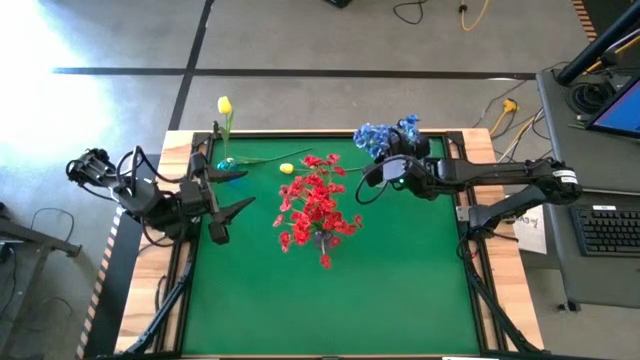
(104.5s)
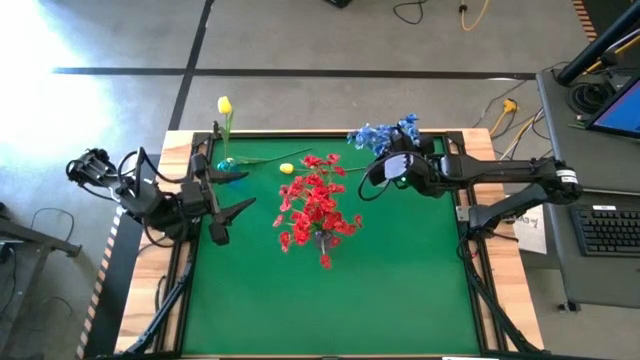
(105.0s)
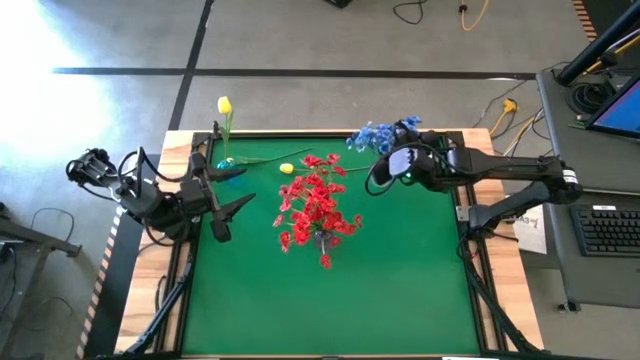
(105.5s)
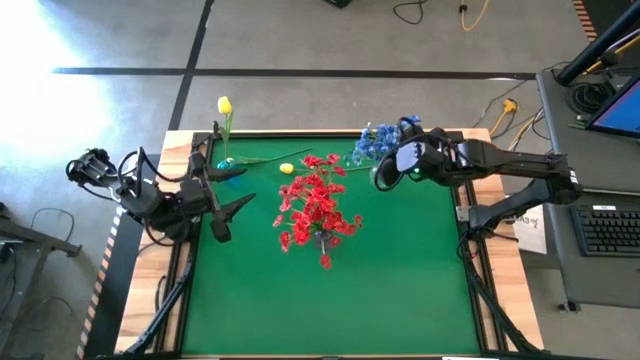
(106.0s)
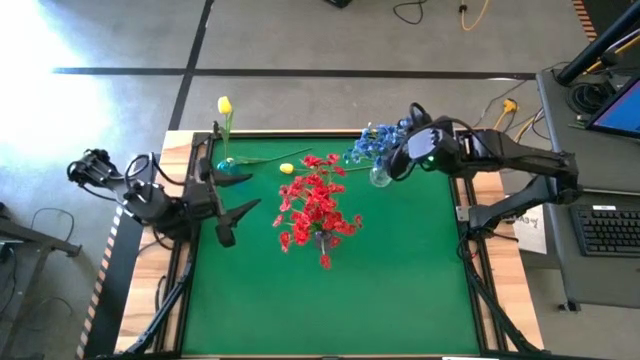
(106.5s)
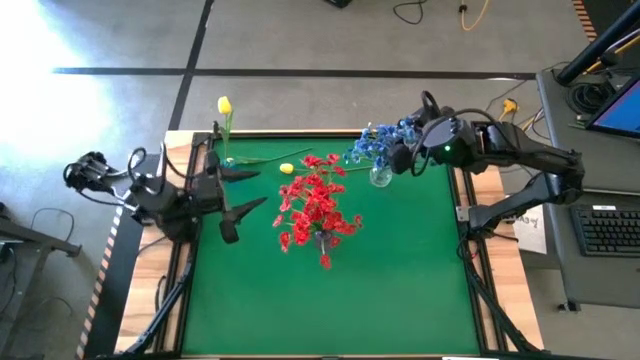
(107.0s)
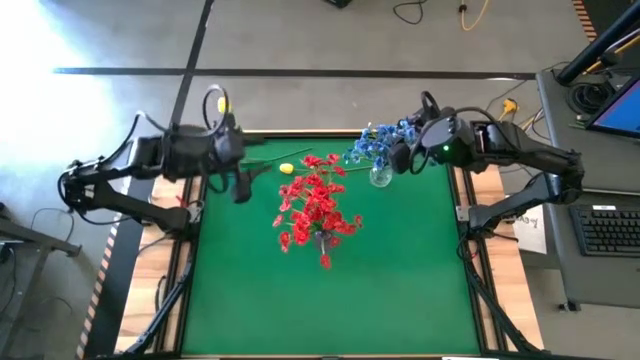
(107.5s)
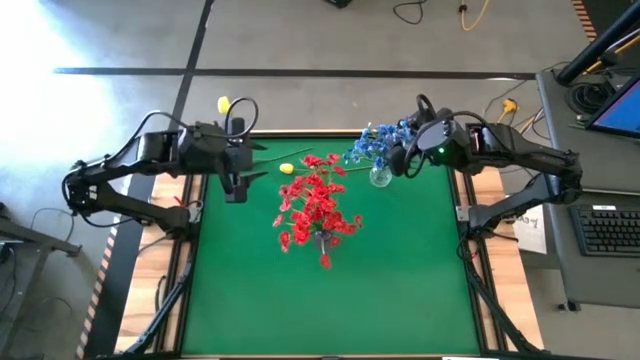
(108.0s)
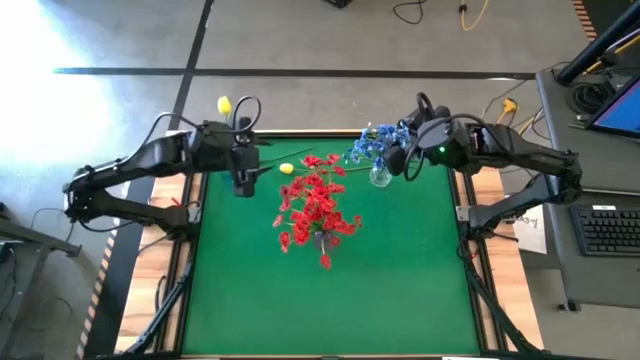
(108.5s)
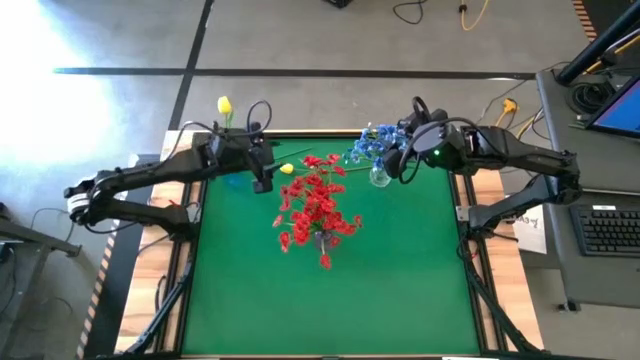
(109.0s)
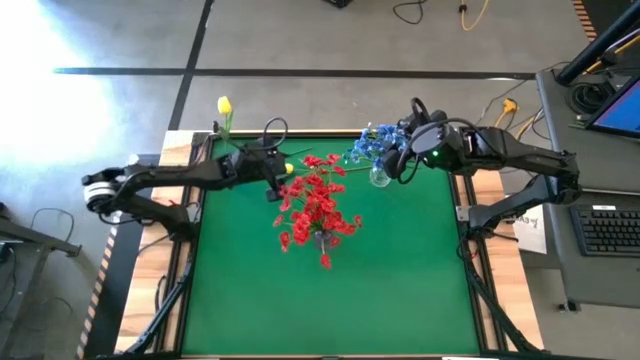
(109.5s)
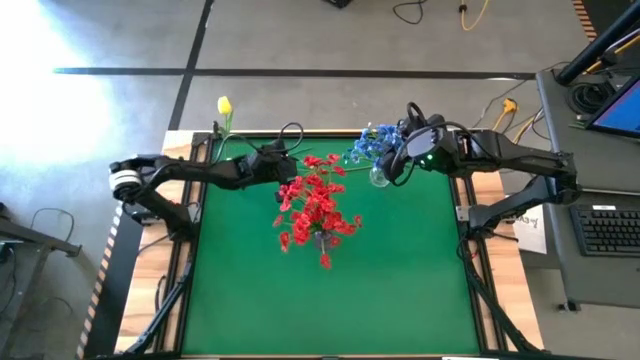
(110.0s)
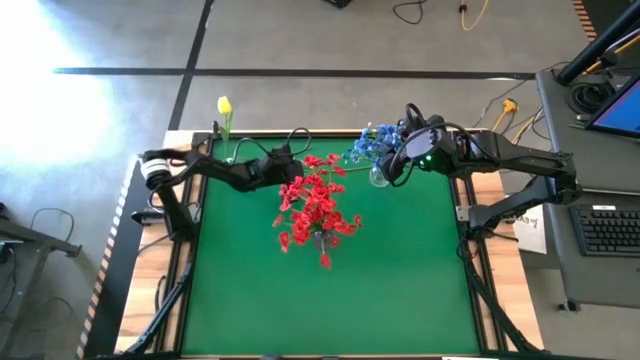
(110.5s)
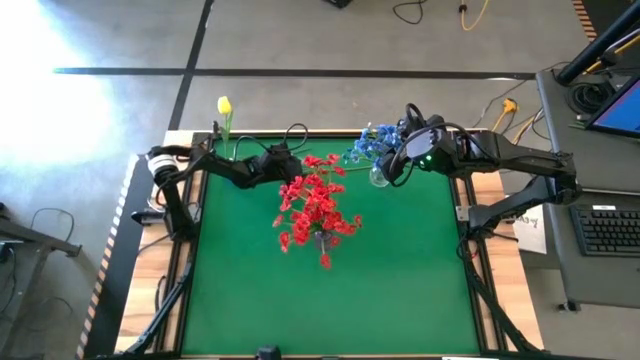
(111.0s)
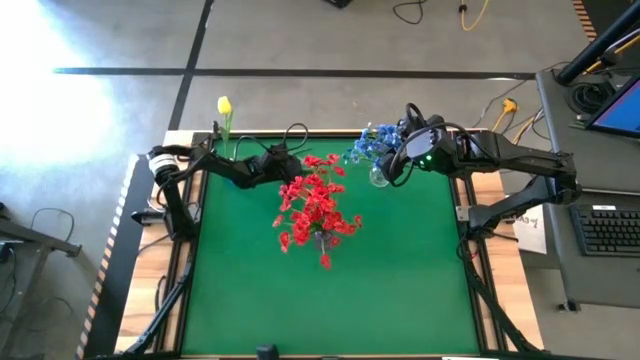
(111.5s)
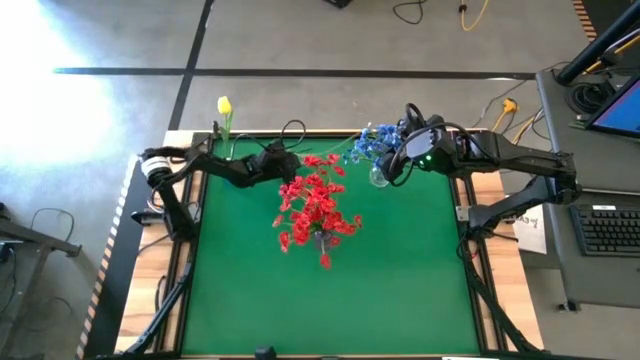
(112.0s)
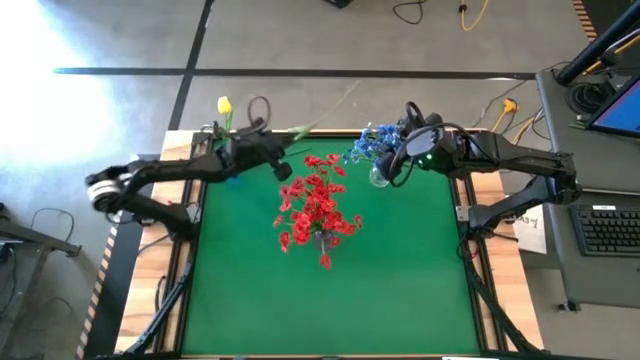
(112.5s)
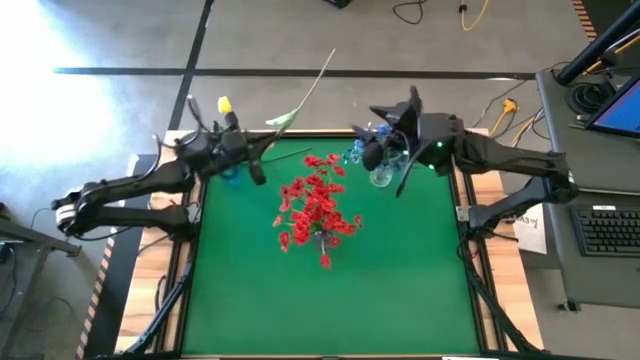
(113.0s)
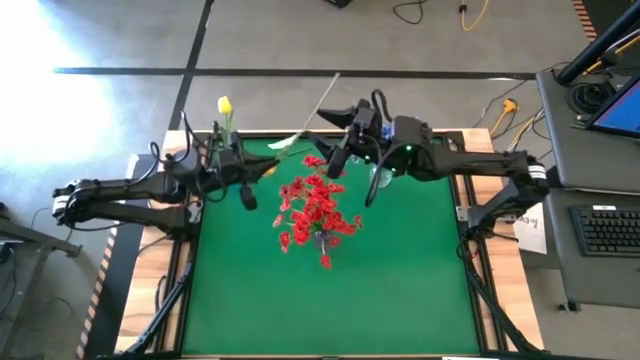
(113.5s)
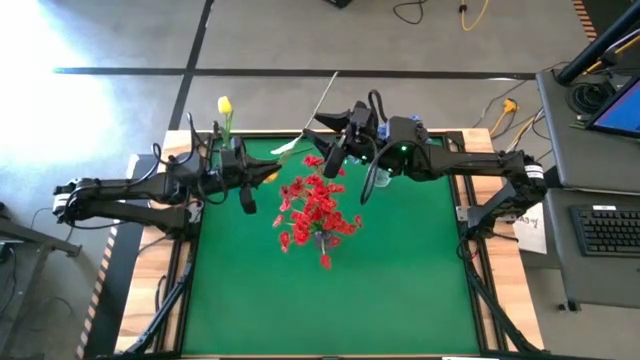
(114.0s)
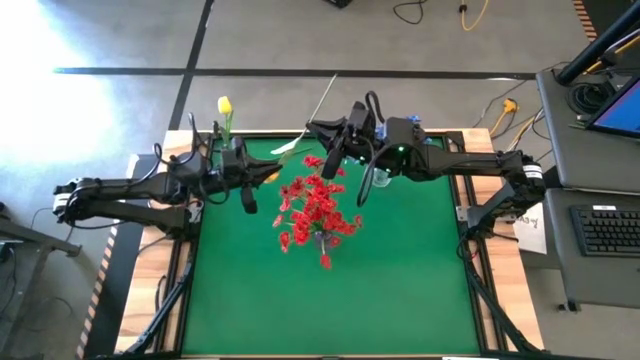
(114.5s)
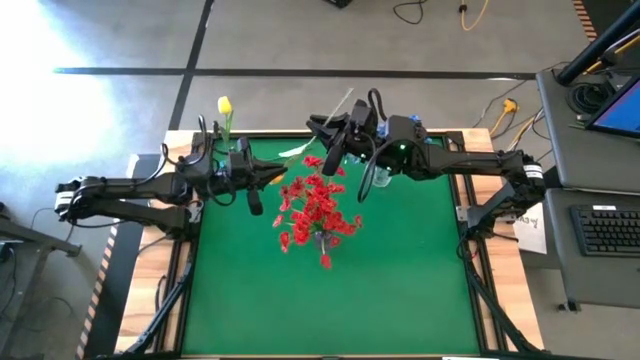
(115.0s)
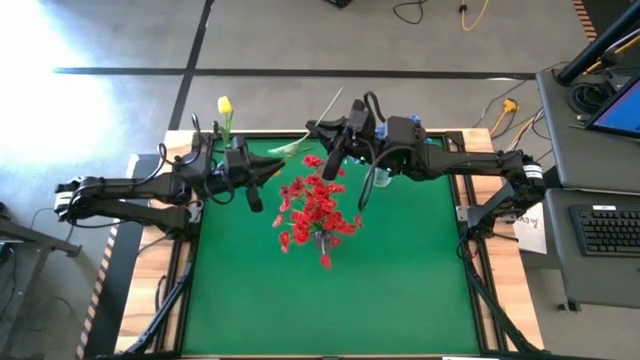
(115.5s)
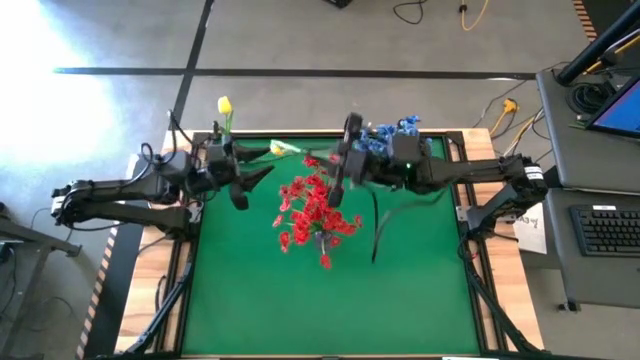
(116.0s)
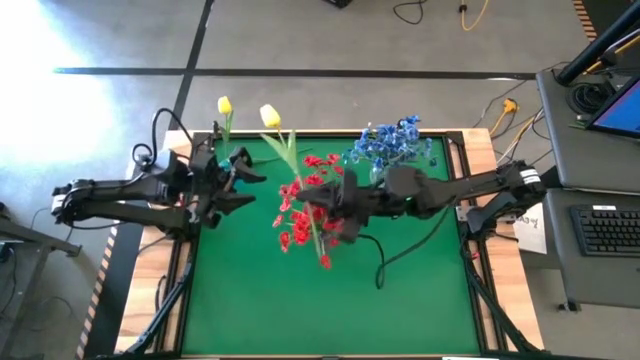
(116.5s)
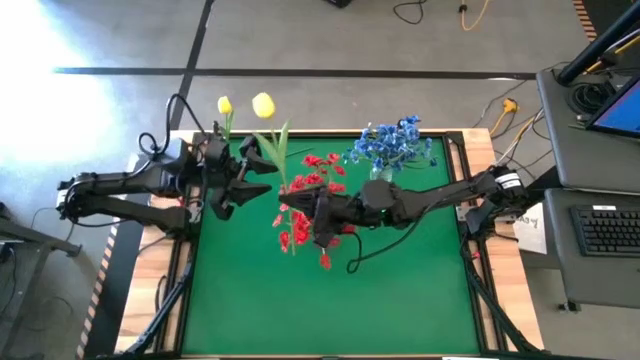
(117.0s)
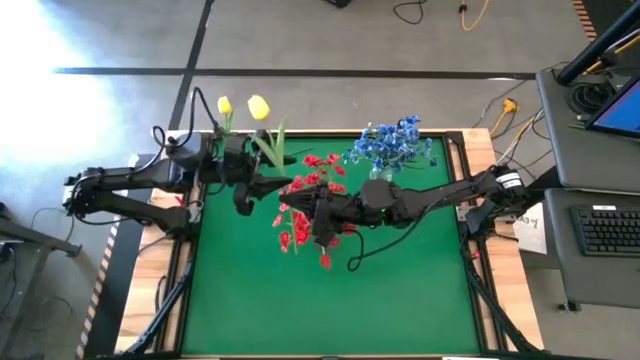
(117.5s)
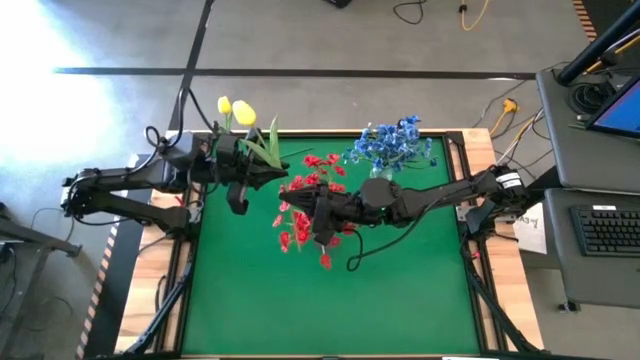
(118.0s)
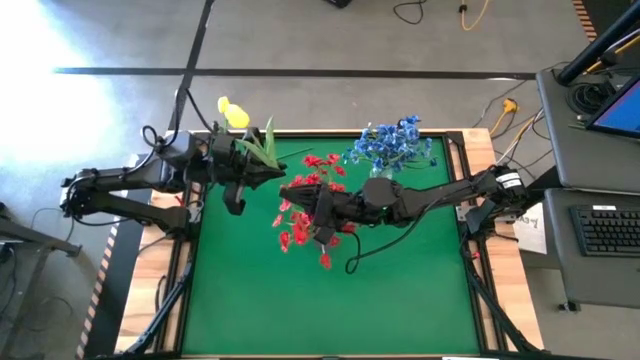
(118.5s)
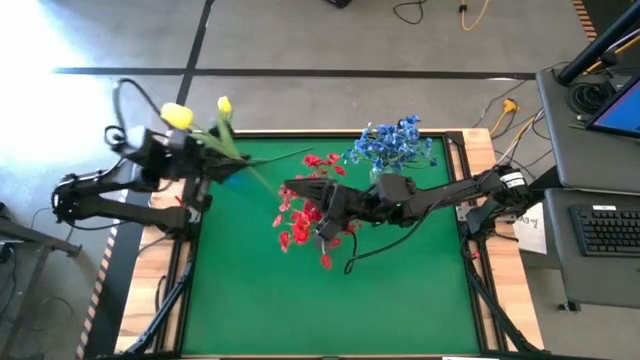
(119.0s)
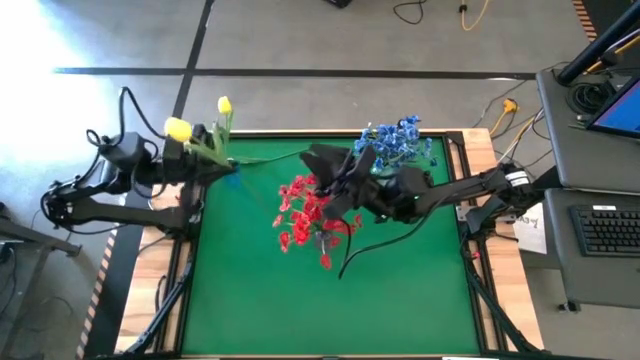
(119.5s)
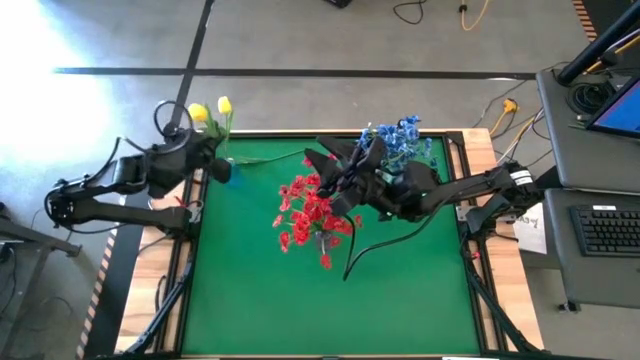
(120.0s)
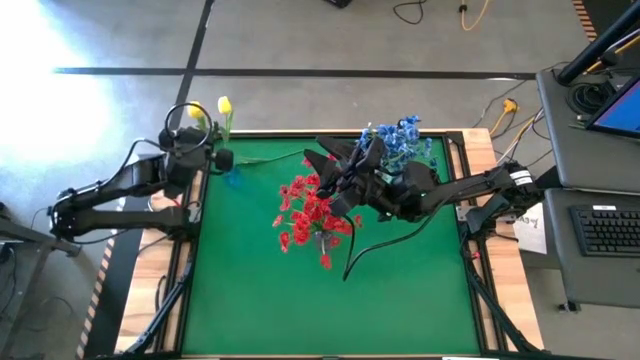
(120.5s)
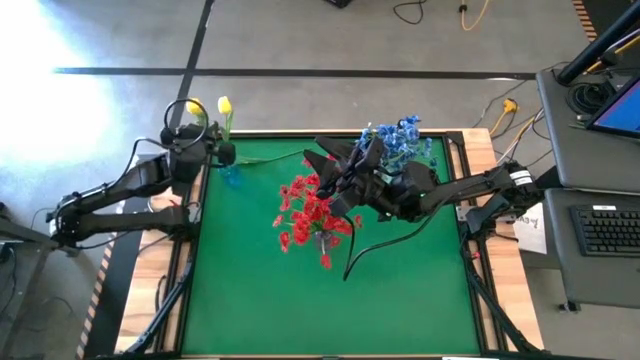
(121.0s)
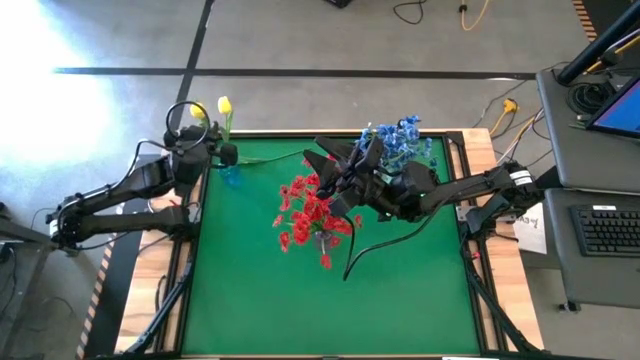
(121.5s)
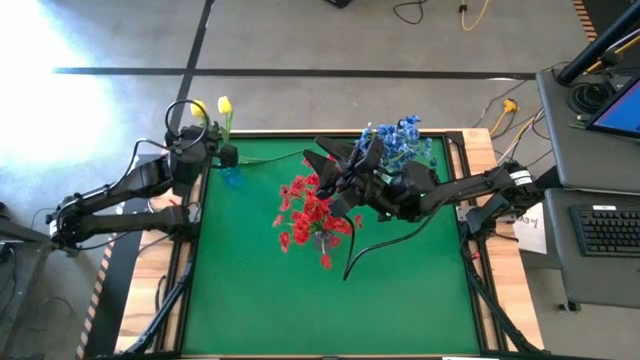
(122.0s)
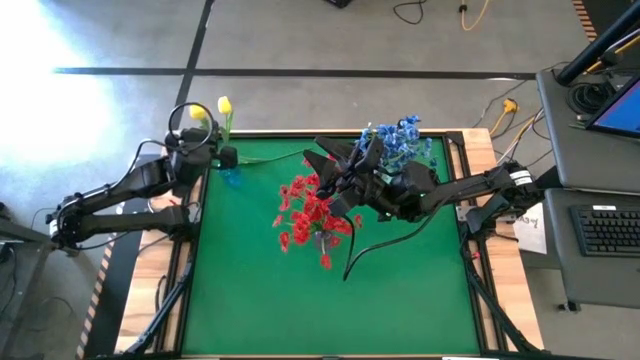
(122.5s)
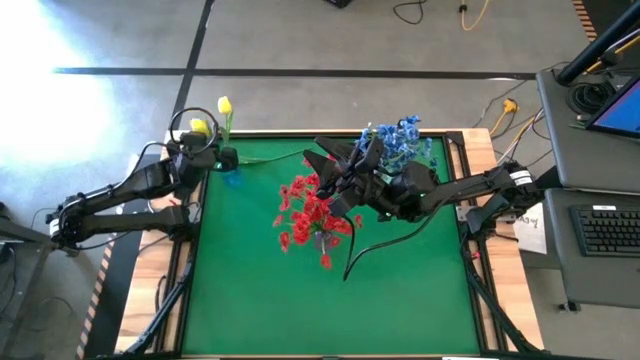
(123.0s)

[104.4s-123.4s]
Task: Sort flowers into vase by color
Put the right yellow flower into the blue vase

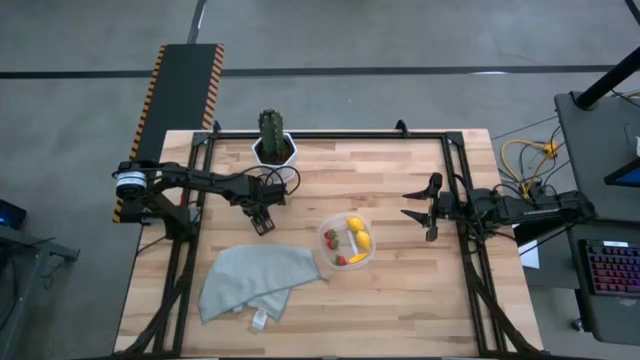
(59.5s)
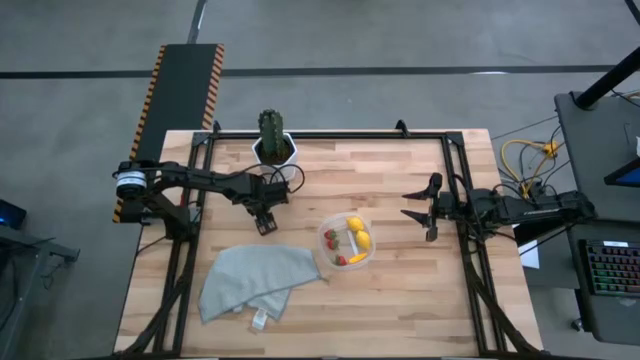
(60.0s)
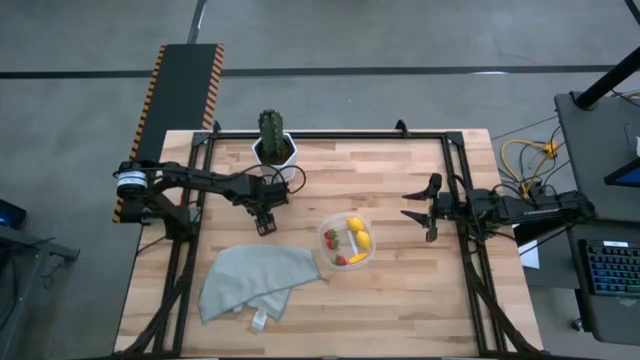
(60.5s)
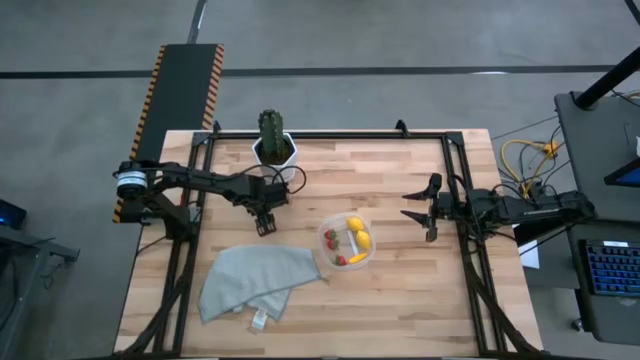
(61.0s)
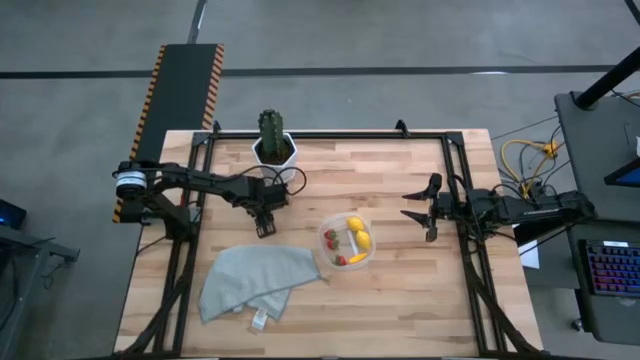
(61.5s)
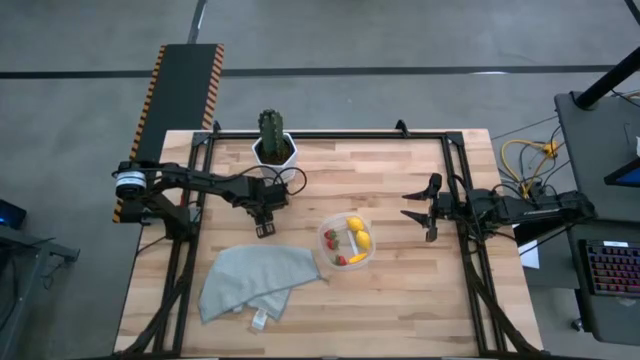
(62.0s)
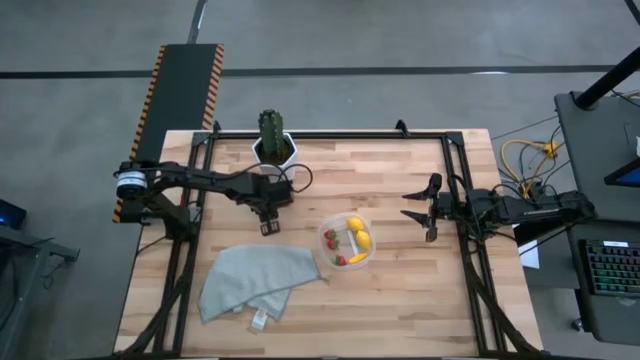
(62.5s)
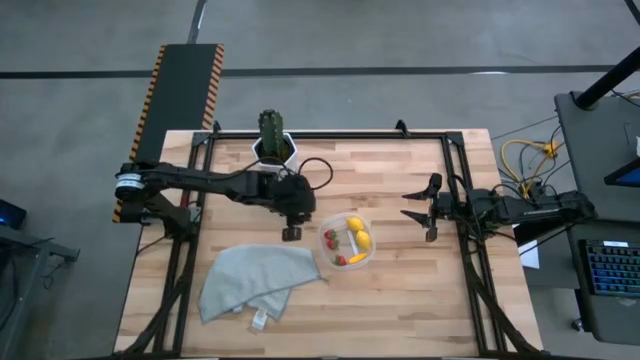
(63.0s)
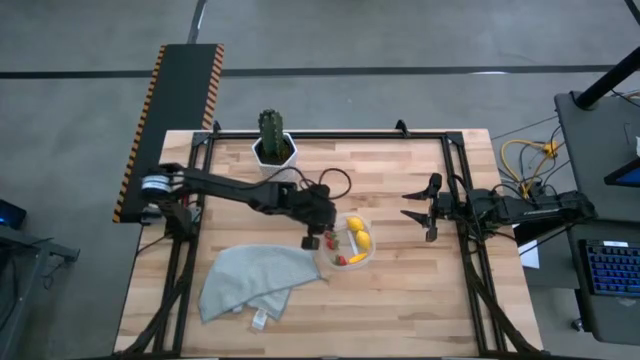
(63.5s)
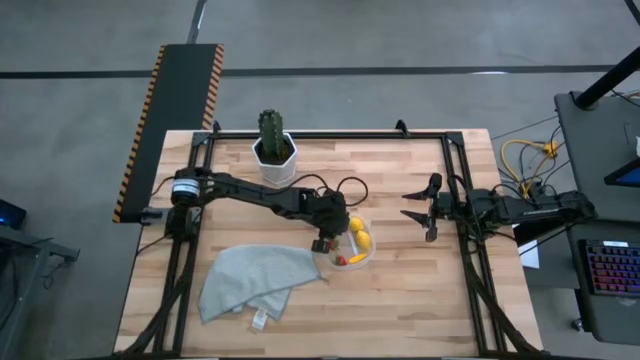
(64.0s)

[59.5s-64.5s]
Task: Pick and placing Produce into tupperware
Put the blackberry into the transparent container
